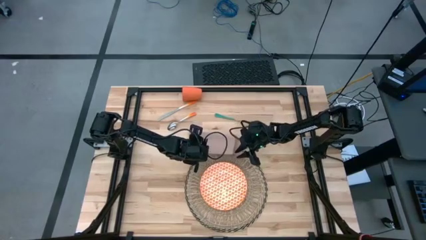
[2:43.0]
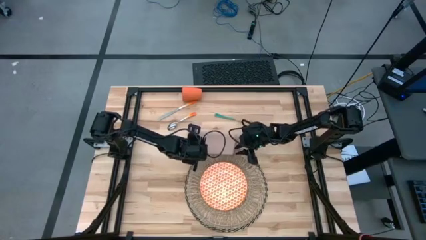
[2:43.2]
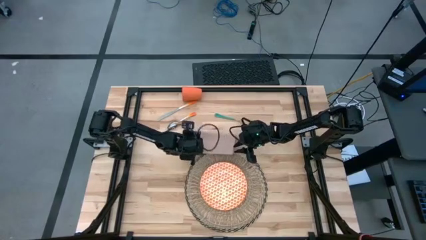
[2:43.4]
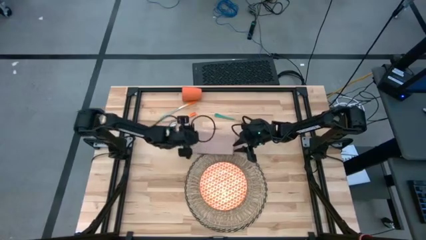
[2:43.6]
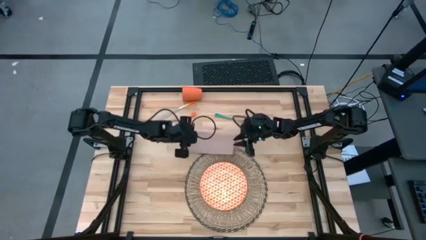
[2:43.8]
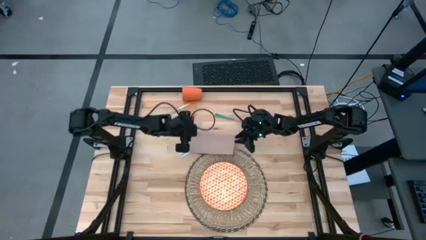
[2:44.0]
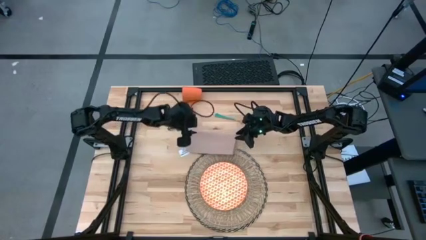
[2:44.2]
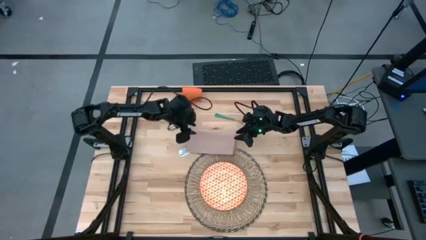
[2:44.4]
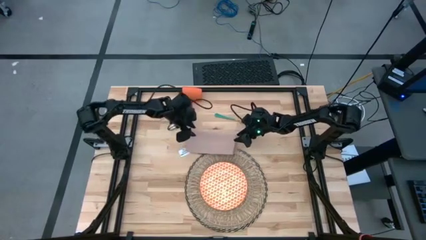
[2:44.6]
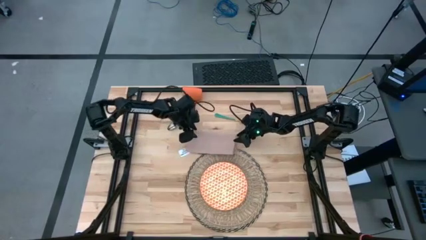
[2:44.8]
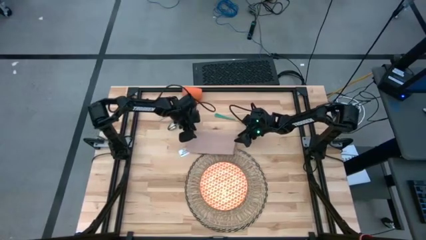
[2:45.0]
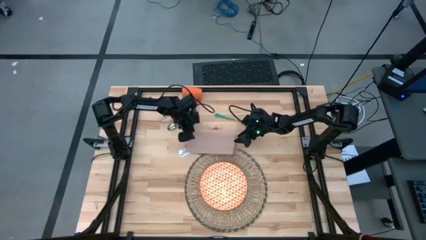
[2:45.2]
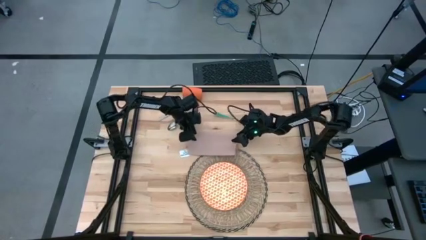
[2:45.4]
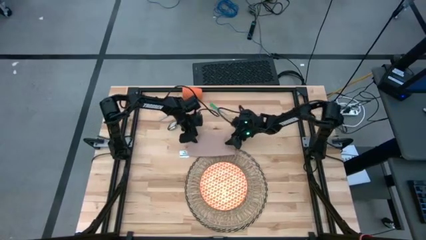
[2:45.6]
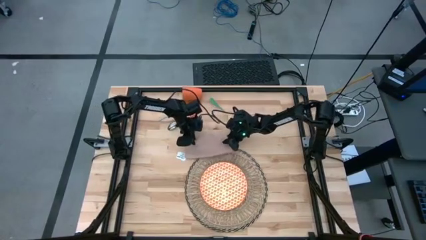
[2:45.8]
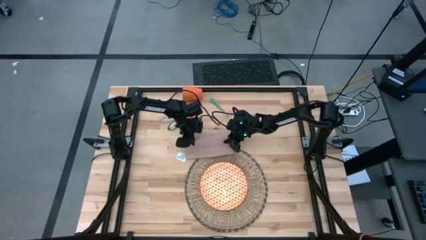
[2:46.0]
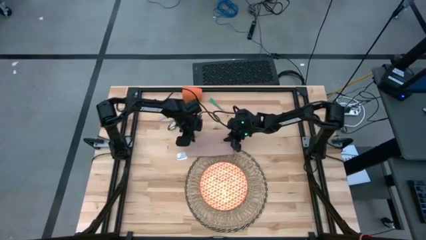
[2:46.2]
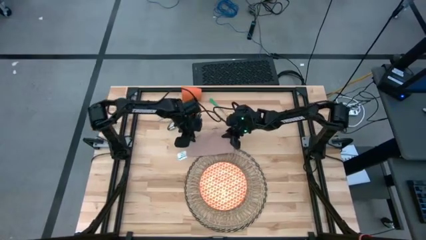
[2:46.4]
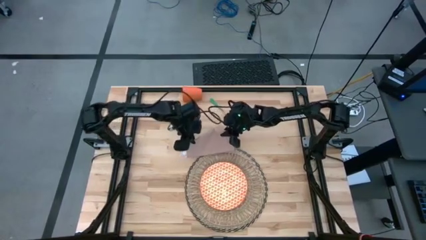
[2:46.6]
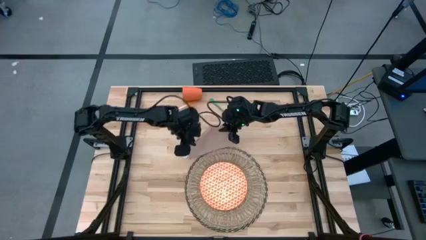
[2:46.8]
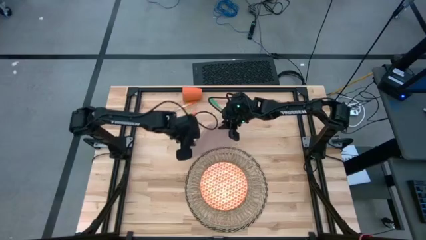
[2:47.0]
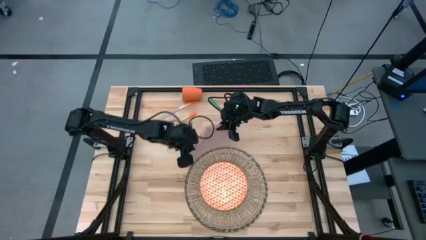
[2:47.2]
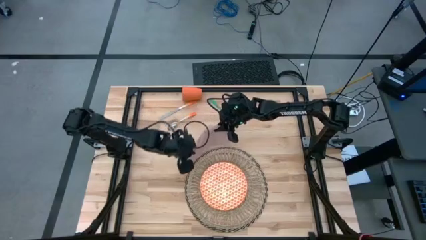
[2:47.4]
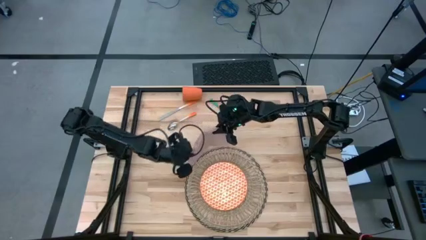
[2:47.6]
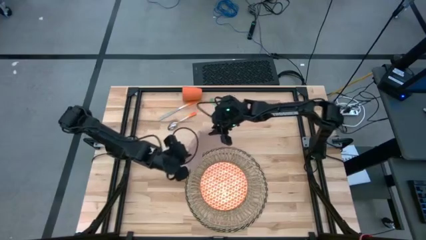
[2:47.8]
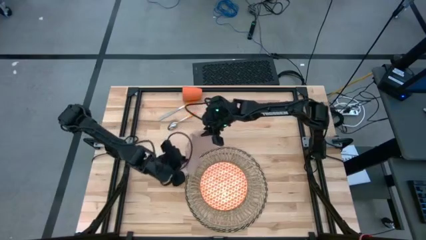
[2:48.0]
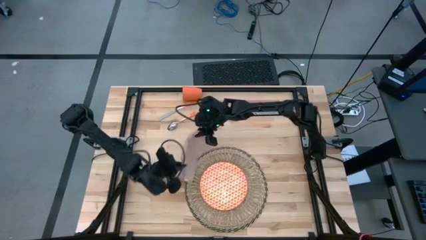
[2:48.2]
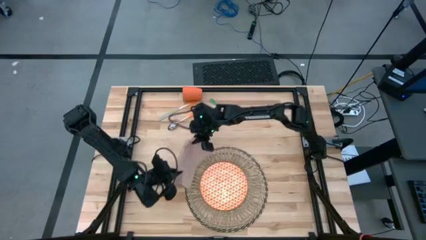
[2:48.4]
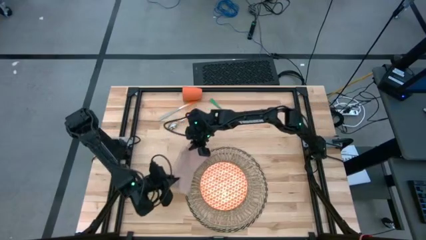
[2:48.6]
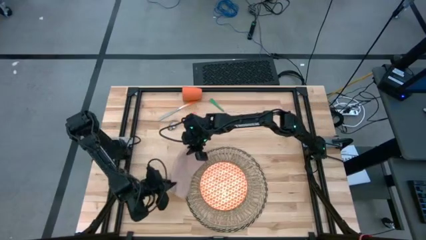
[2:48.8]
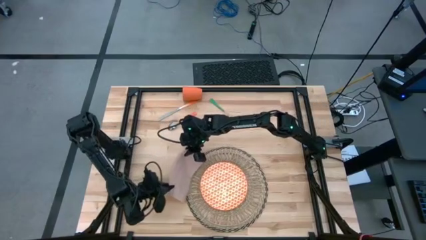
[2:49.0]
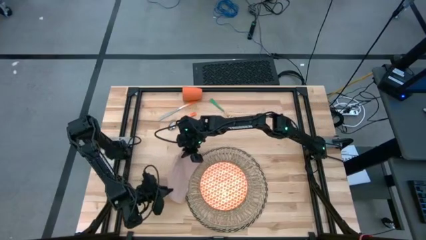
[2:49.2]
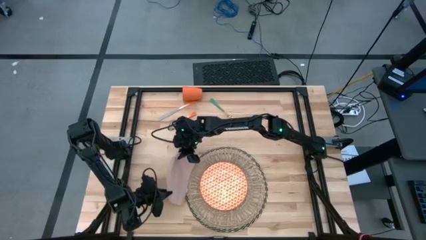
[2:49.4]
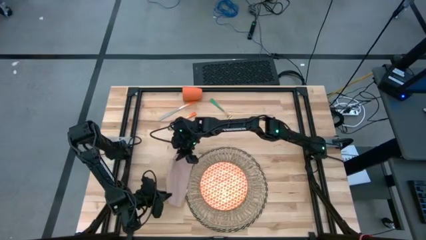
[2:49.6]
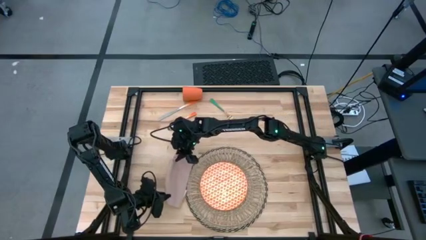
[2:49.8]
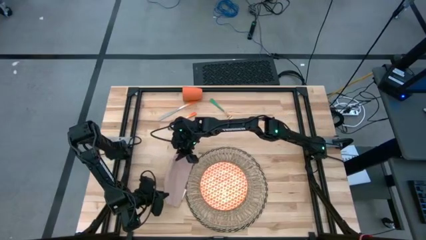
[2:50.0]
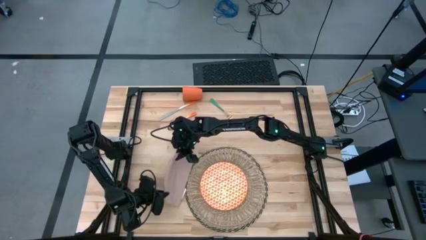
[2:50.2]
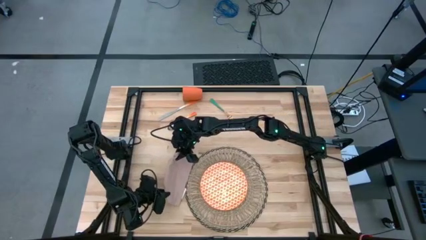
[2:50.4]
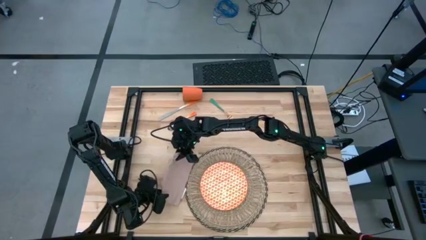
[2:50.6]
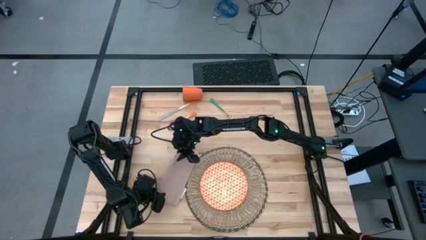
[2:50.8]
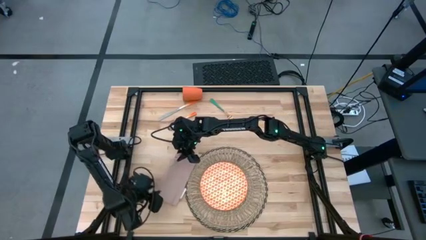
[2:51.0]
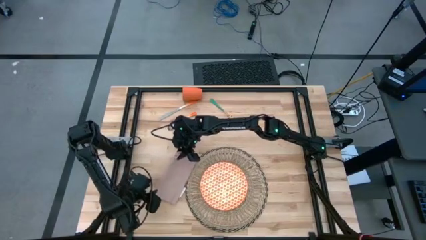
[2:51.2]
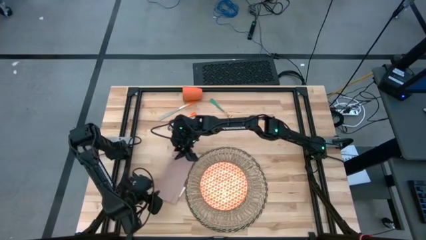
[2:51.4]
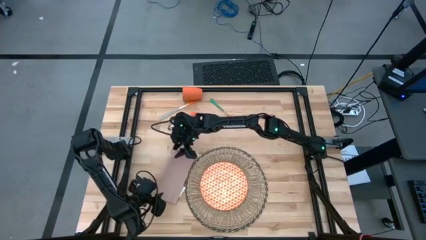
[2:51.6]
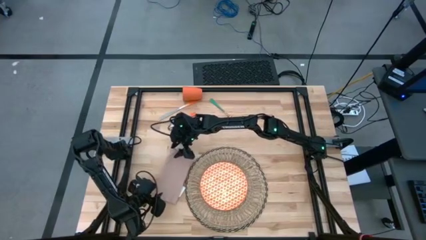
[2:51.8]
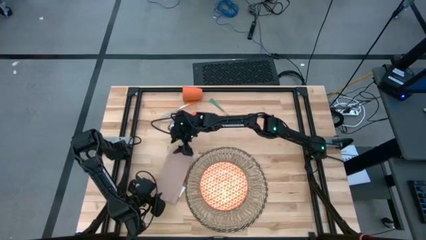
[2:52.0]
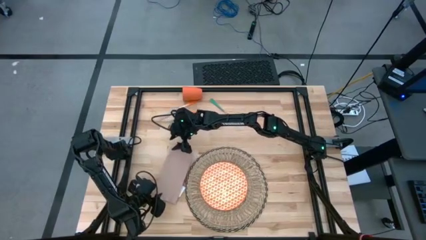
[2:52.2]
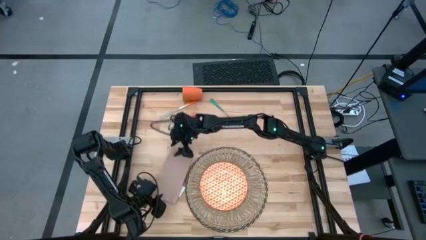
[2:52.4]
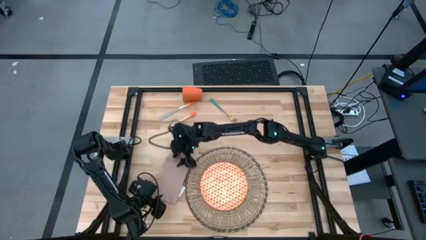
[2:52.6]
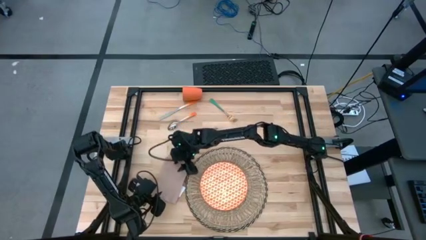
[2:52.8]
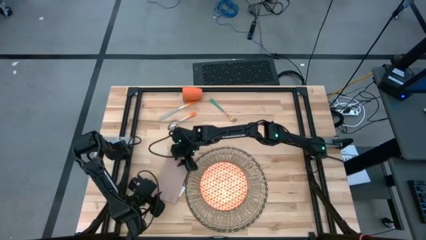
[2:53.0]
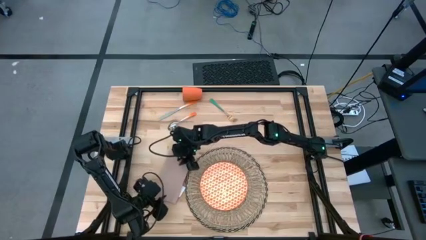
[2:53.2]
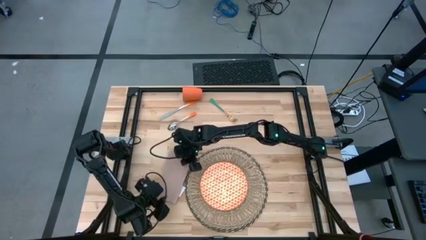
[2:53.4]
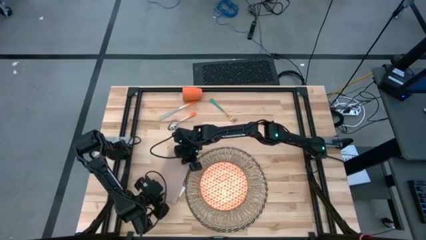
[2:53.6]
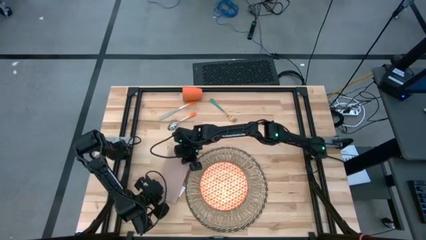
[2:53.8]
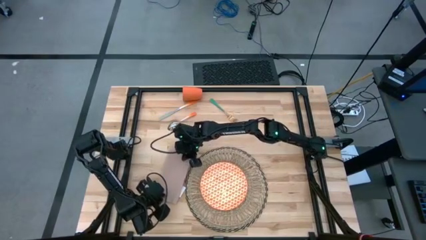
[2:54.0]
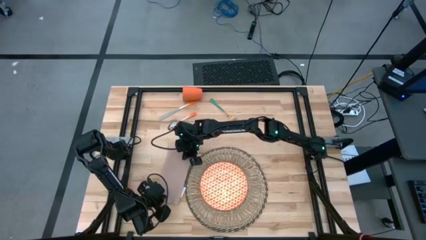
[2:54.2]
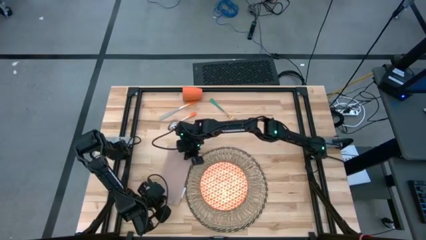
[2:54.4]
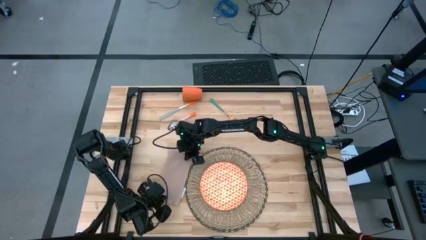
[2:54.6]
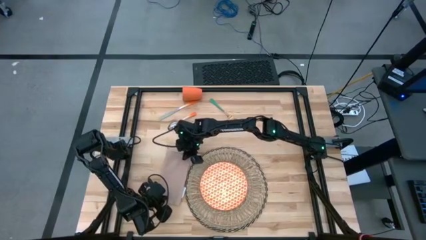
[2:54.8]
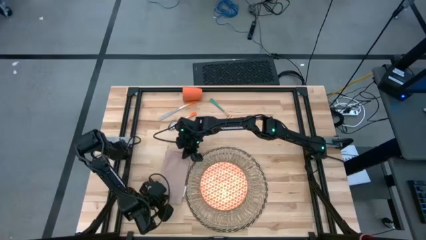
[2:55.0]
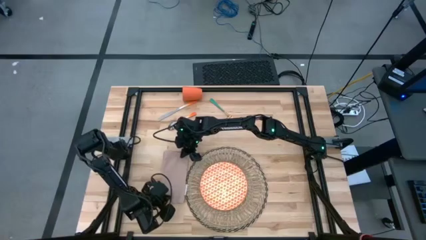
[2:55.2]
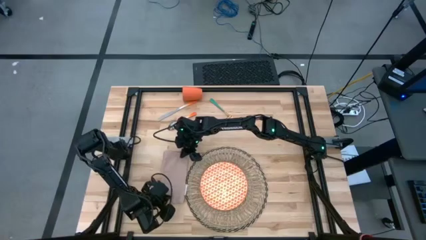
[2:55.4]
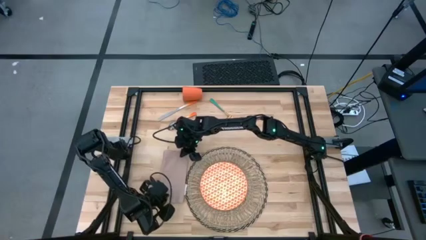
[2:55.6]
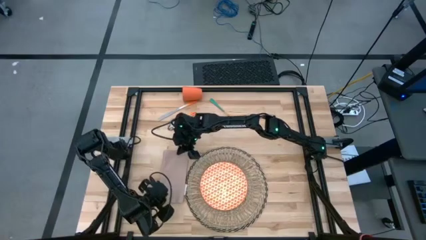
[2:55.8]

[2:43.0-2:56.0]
Task: Set table place
Put the napkin on the left side of the mat

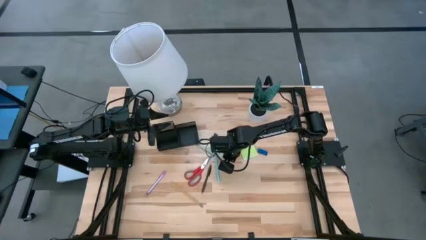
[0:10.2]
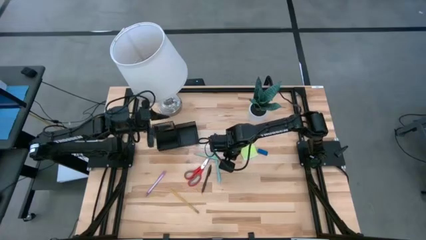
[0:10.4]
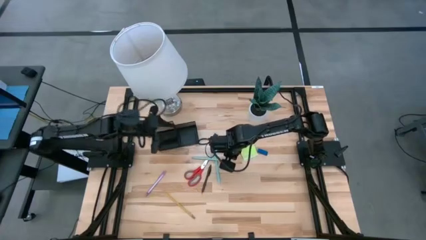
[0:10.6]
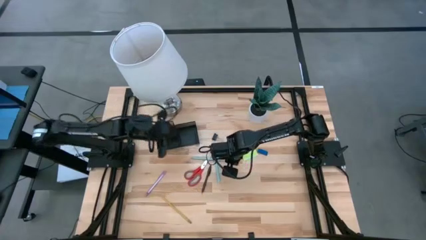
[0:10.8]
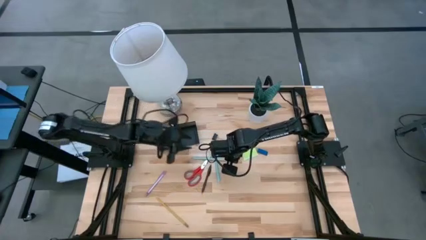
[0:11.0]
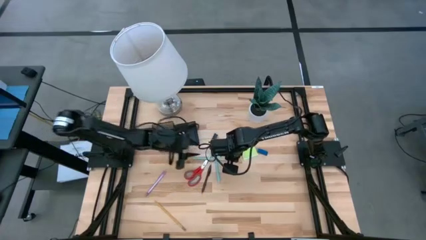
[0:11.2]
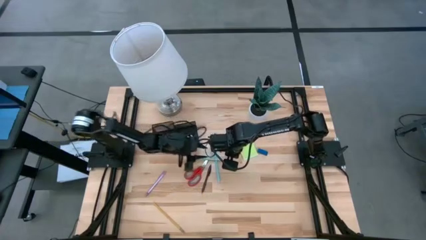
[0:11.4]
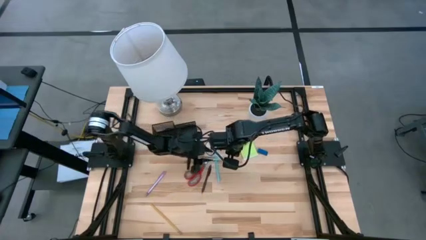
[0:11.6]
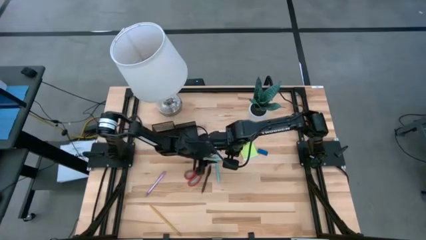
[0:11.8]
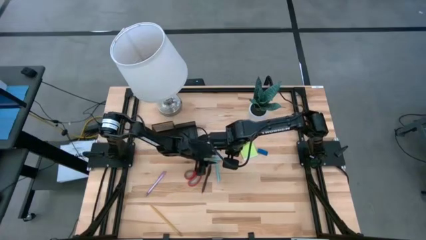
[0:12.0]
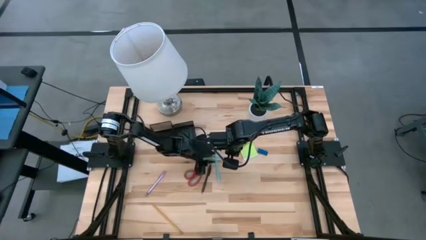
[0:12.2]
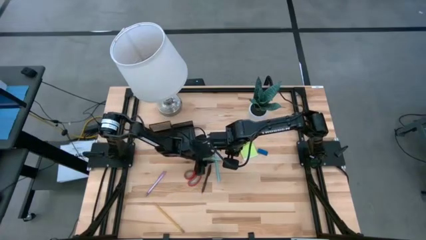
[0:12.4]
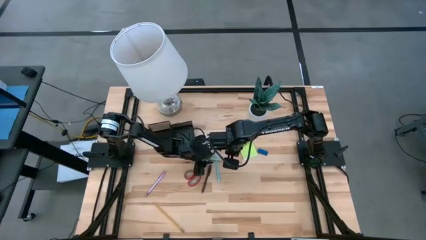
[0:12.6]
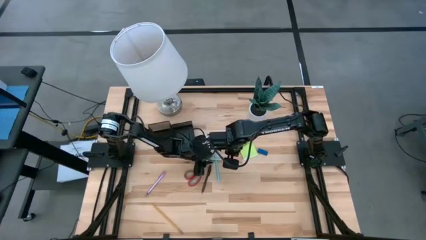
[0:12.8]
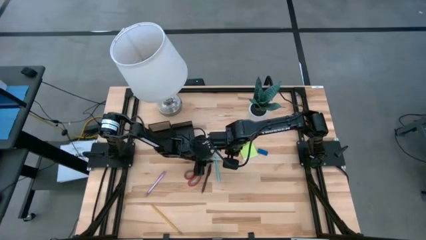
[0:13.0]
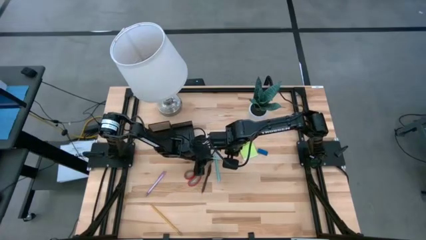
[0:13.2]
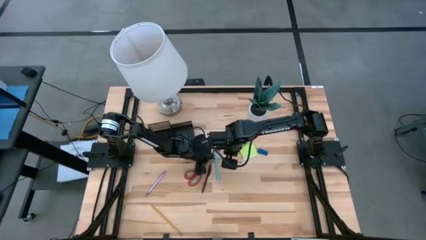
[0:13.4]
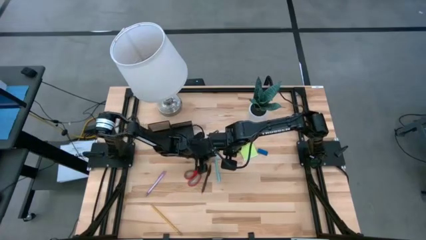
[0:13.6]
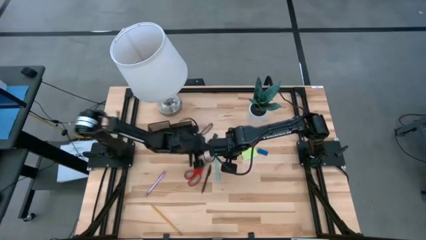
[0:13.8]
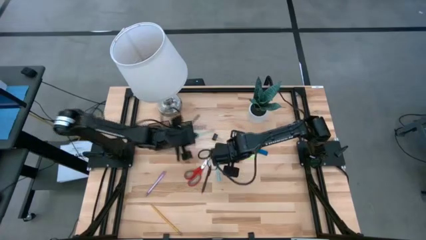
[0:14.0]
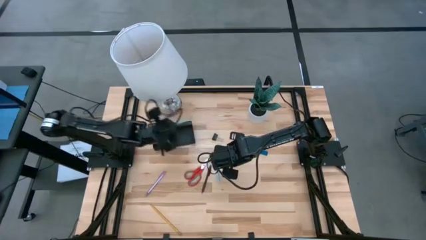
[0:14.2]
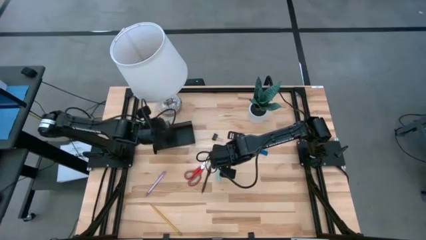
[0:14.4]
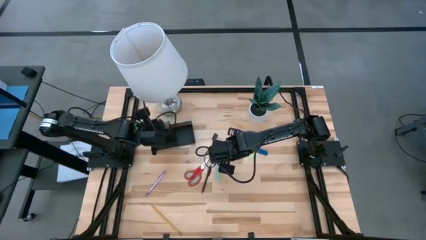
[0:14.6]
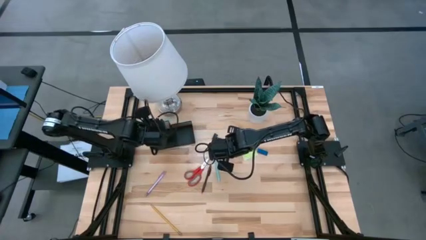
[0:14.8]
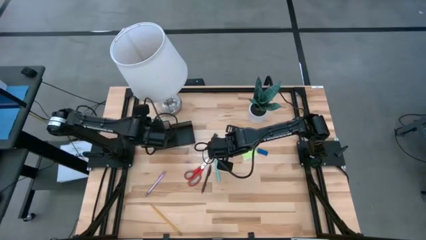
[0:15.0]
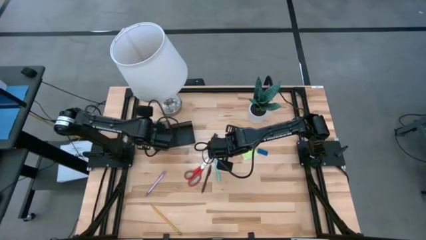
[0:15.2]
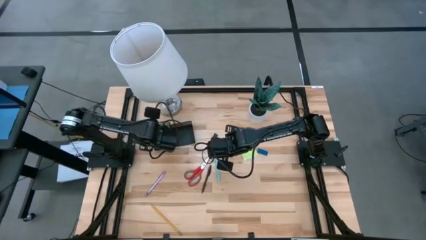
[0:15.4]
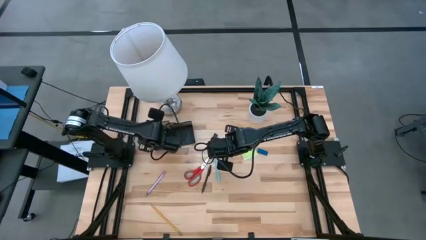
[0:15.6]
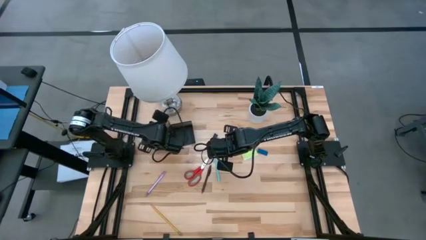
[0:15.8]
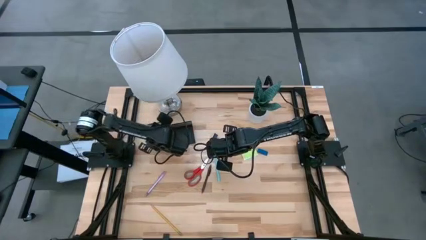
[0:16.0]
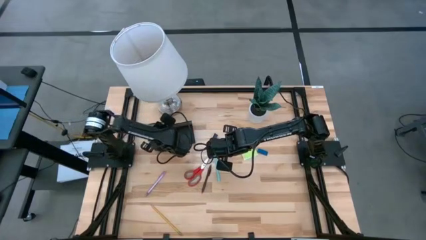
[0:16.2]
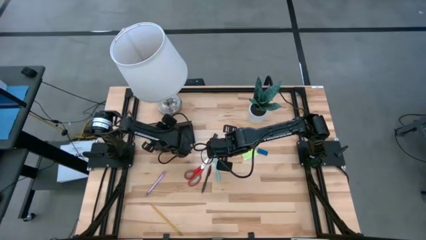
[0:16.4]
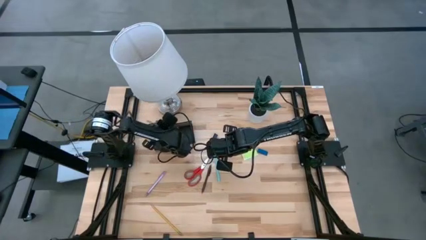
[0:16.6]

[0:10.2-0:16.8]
Task: Pick and place office supplies into organizer
Put the top blue pencil into the black desk organizer
